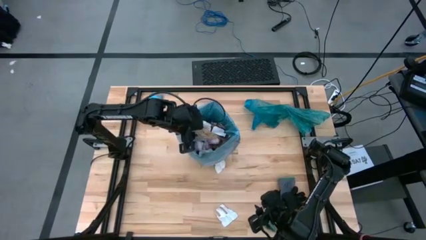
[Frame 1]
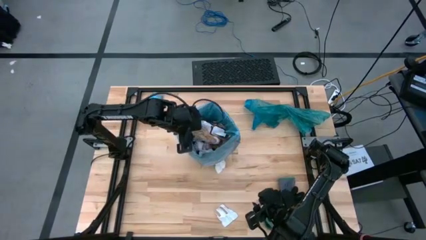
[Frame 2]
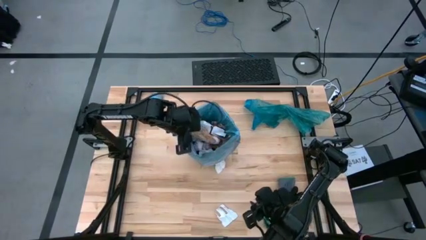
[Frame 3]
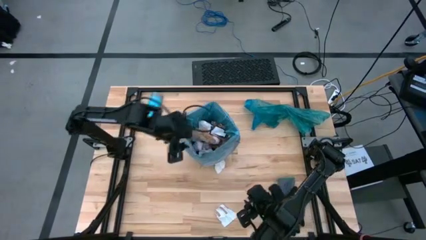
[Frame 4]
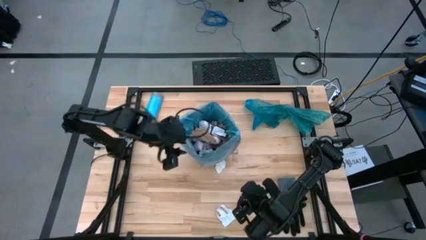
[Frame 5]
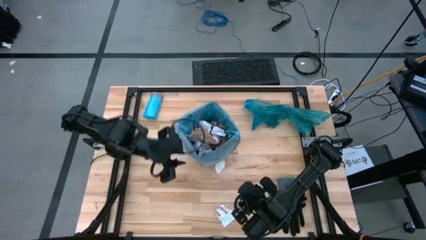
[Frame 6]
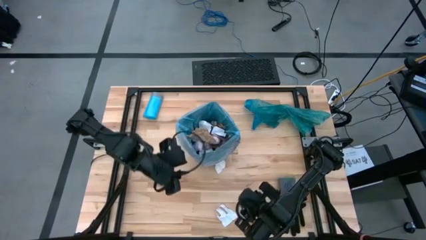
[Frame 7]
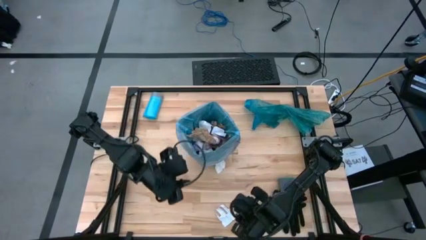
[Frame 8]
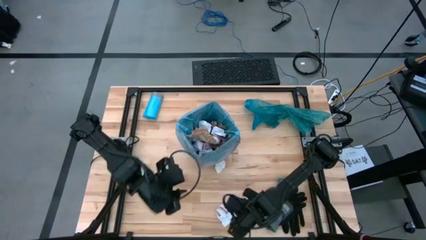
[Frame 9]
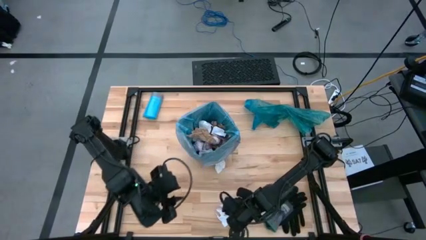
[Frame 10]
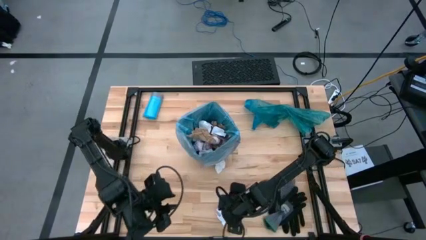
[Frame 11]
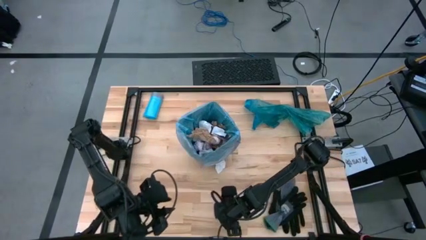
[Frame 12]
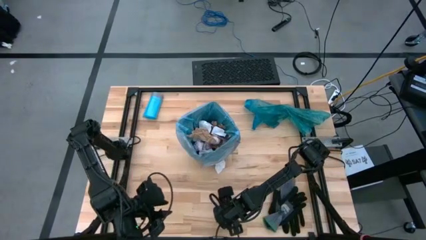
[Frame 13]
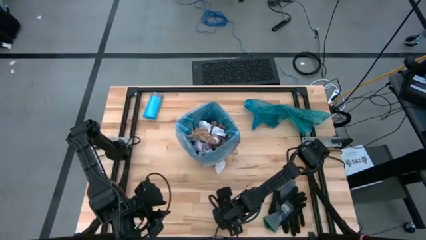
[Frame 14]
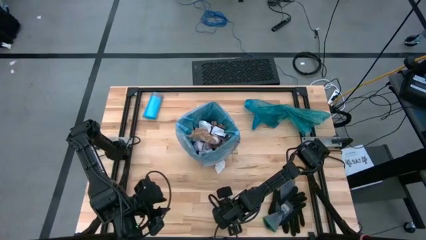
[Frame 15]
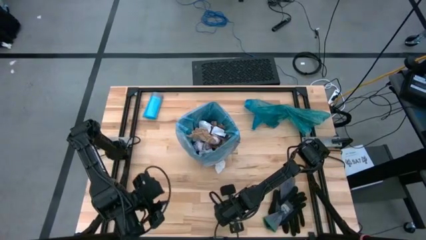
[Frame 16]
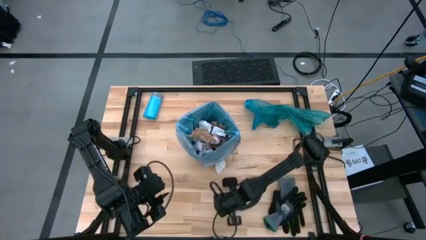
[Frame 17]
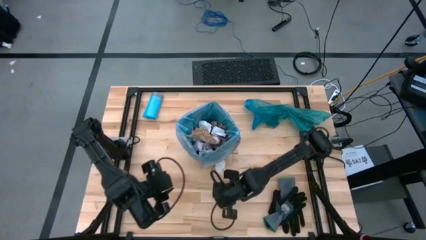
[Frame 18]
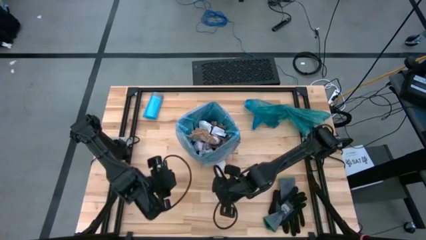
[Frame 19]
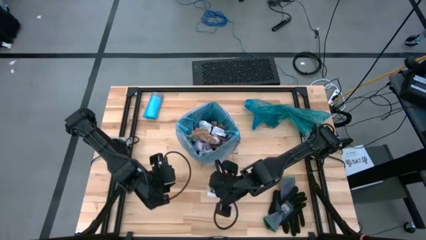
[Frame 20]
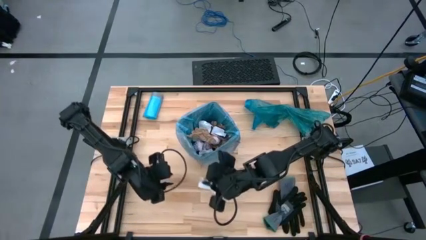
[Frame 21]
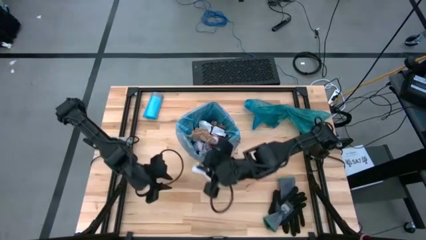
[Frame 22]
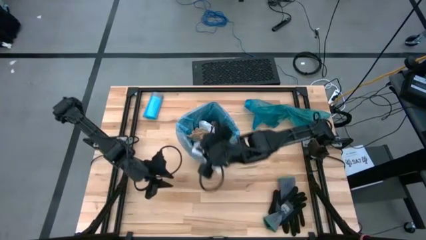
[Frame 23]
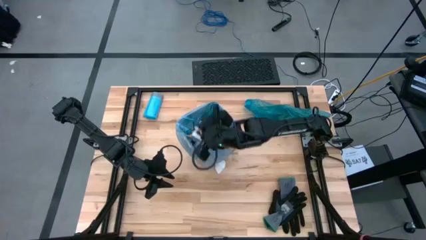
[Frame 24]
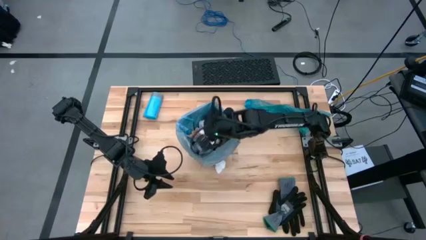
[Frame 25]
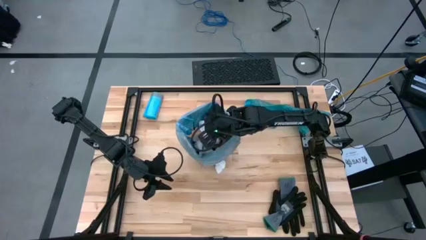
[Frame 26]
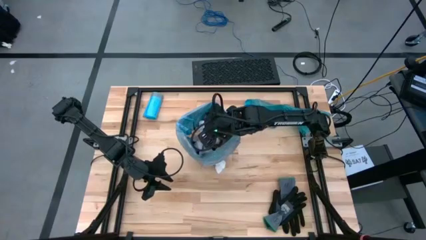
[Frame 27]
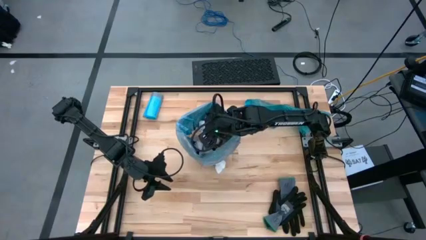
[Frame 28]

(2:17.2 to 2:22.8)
Task: place trash/remove bag and relplace
Put the white paper trash into the trash bin

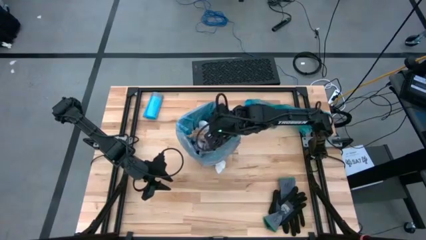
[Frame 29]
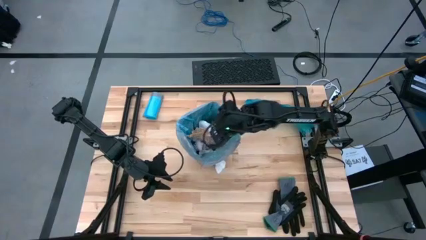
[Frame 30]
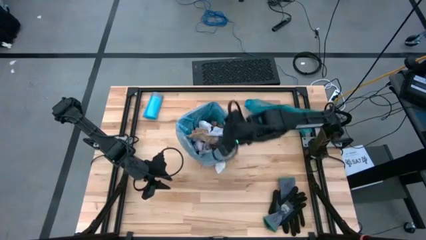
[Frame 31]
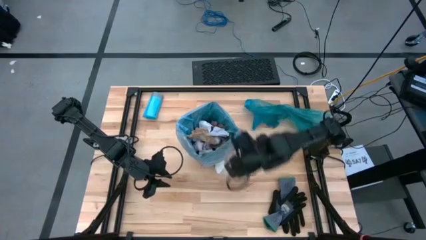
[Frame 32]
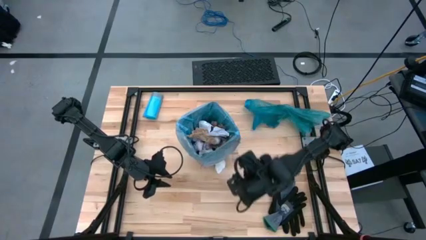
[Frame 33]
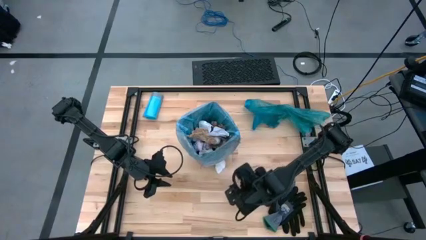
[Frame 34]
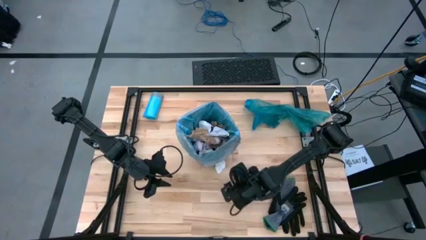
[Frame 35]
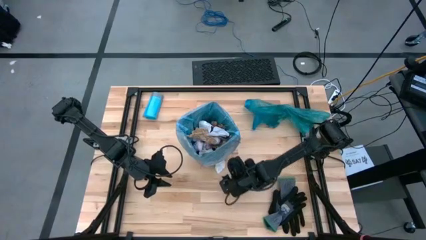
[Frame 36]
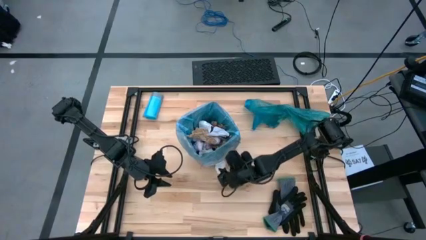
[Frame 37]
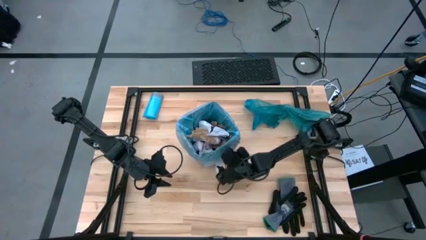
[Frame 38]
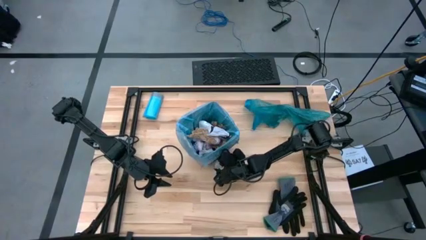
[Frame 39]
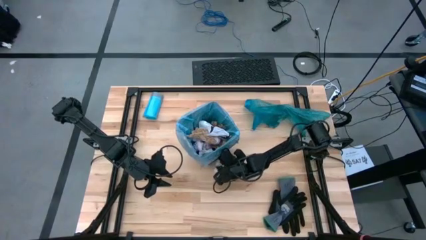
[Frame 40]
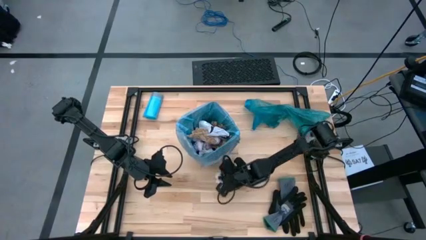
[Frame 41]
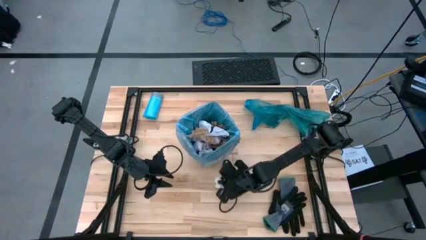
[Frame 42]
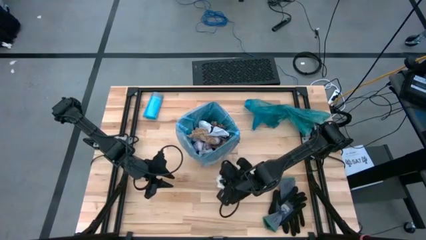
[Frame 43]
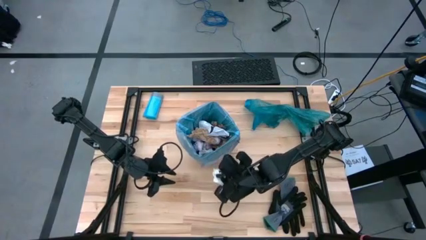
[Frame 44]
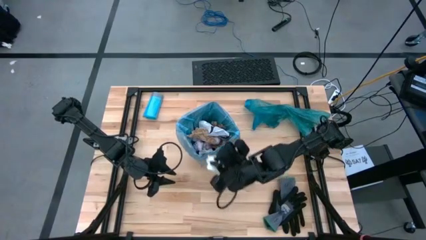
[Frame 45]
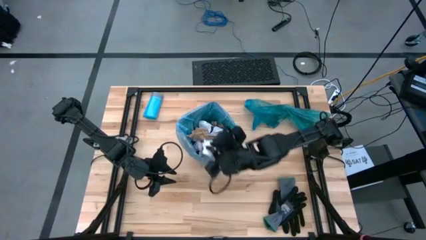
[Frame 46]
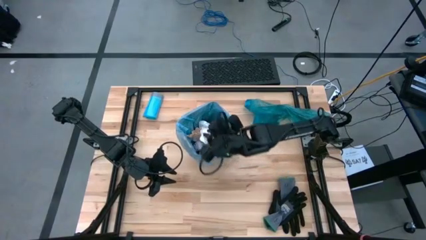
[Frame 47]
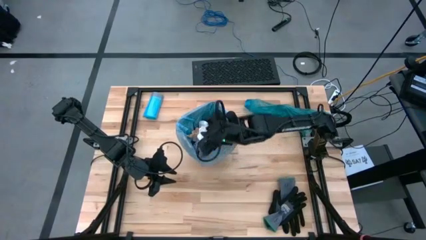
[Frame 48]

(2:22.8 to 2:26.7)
Put the white paper trash into the trash bag

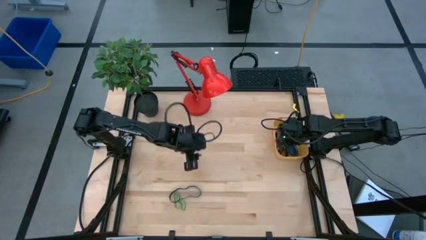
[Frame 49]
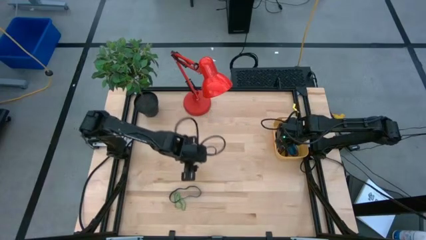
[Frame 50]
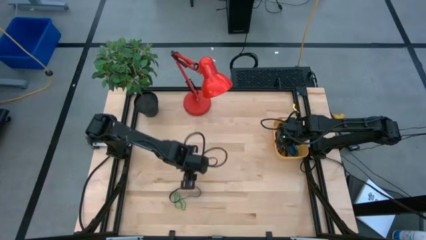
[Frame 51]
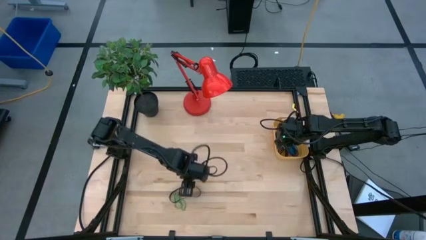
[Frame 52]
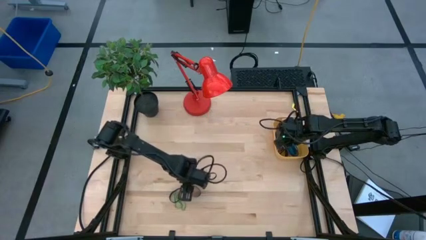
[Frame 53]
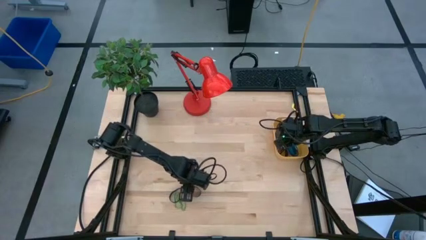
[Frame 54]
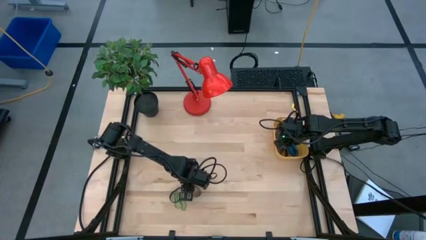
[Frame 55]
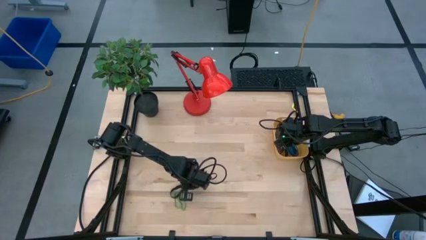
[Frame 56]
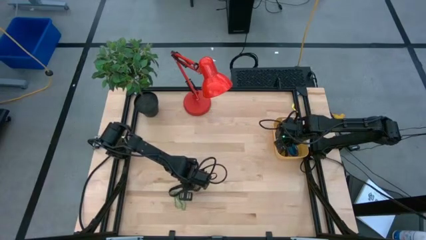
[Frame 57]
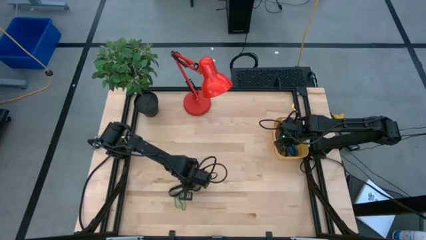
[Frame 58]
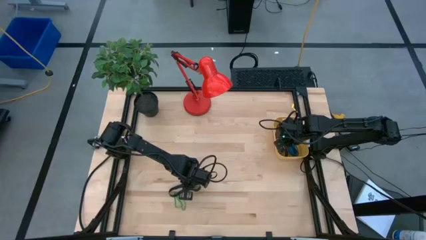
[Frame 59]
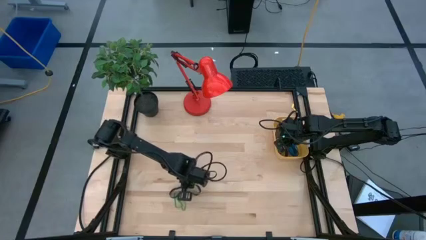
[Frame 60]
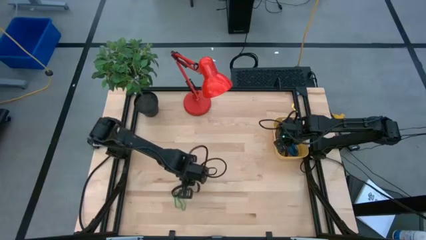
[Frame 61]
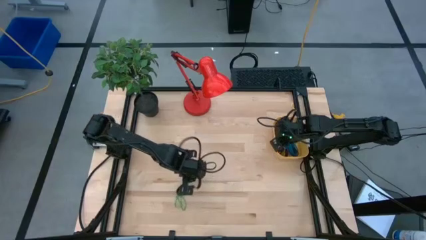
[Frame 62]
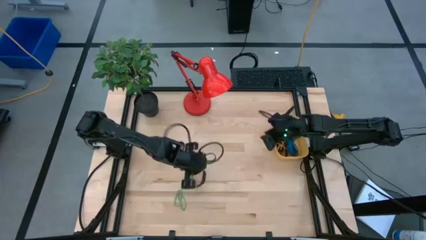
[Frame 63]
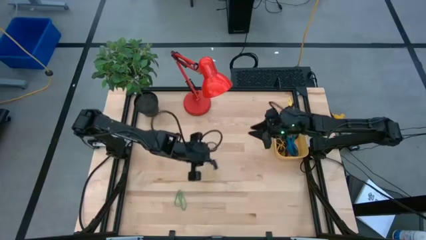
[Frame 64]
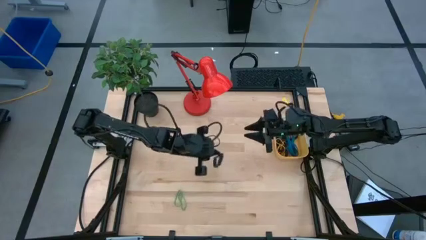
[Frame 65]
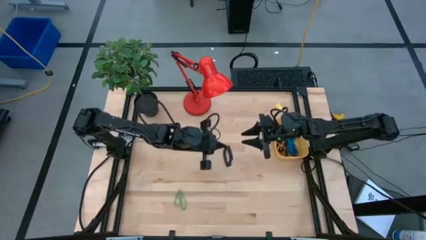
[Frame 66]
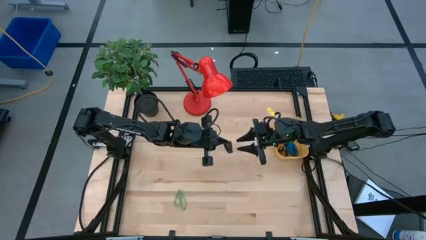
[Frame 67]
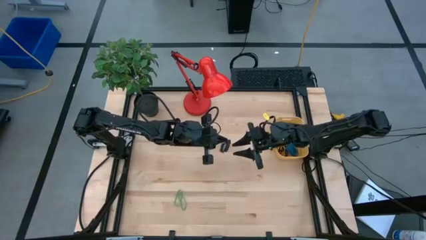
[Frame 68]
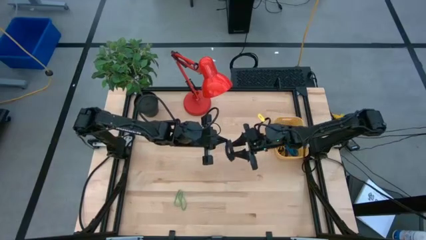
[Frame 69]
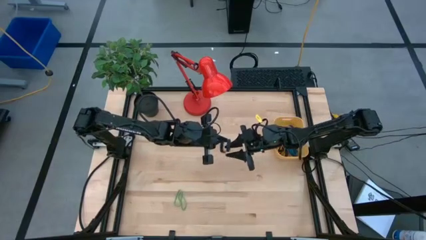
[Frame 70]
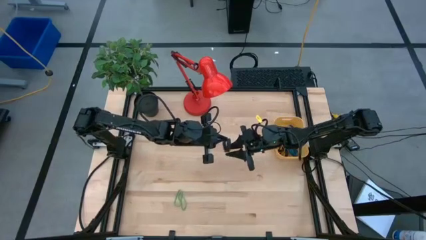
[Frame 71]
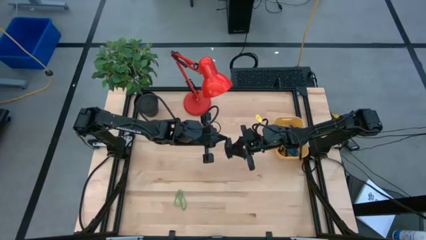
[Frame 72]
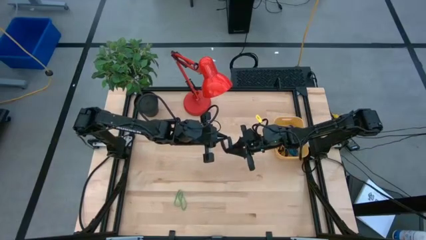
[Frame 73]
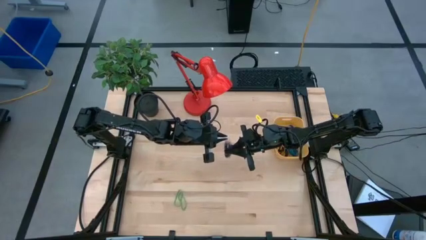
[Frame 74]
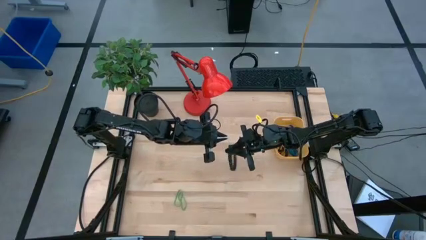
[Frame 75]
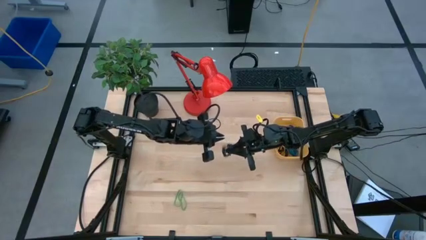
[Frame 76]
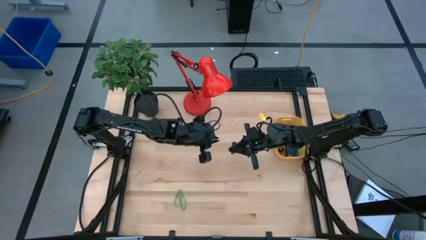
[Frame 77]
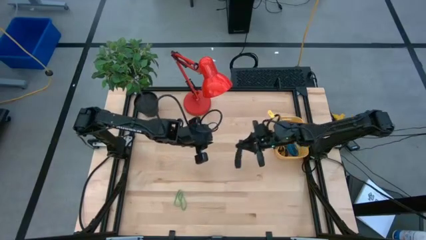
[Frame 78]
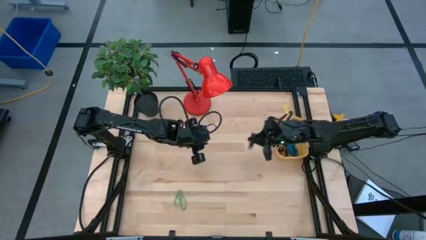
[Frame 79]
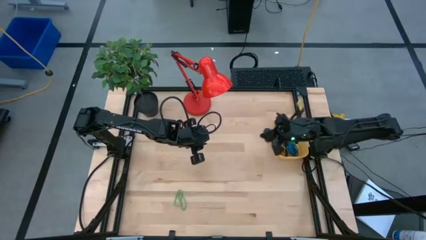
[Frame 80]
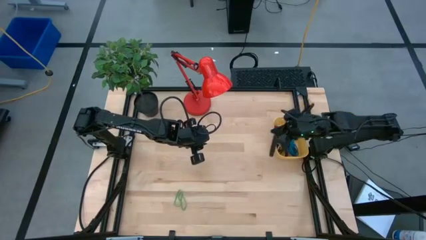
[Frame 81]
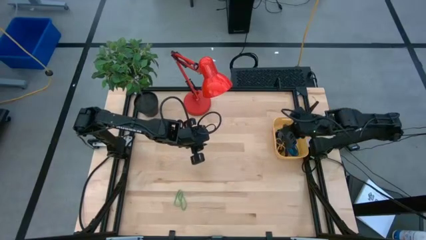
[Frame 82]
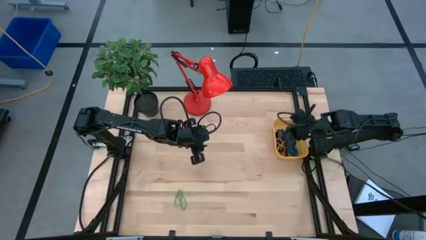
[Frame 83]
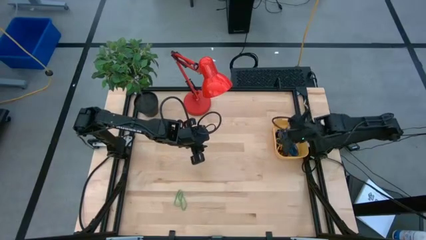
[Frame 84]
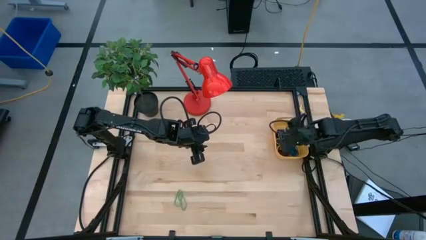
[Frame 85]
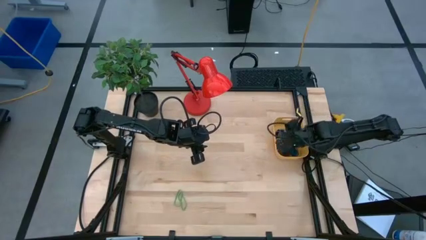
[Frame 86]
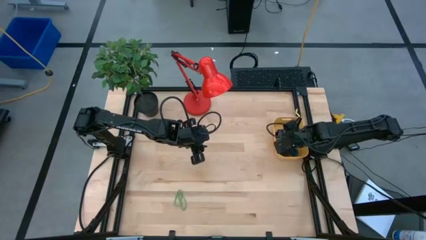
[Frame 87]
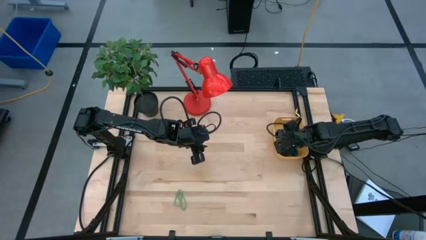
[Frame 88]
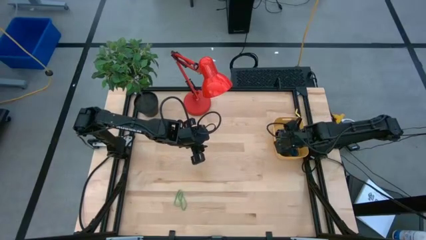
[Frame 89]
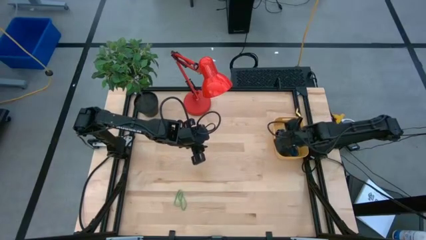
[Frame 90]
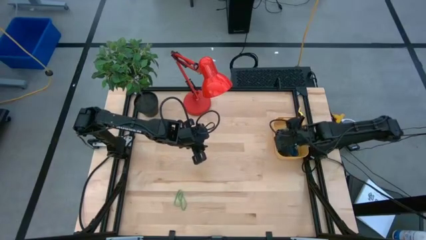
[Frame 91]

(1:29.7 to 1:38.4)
Task: Pick and place rubber bands into bin
Put the black rubber band into the yellow bin
